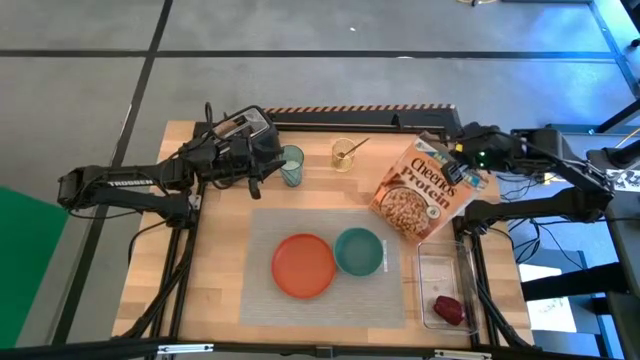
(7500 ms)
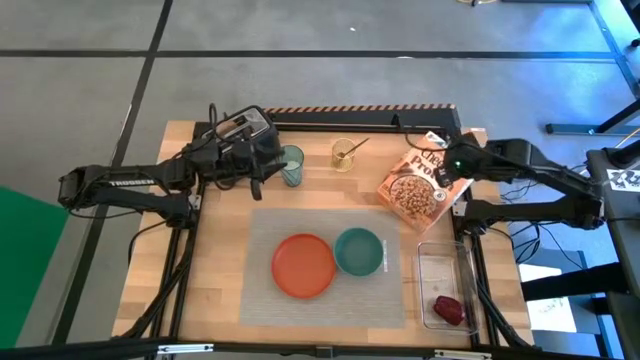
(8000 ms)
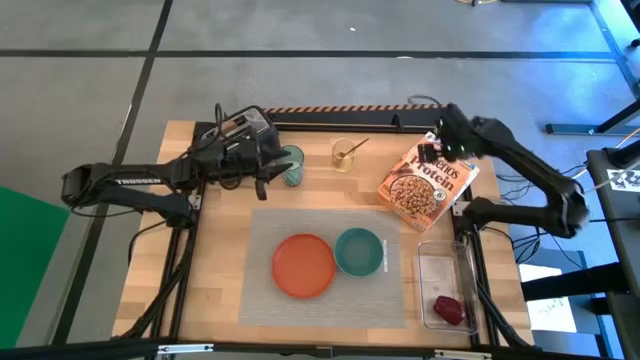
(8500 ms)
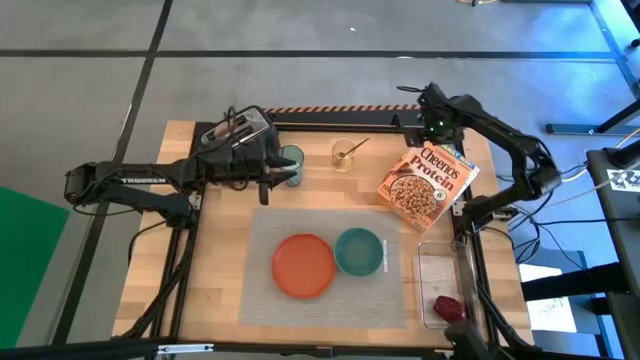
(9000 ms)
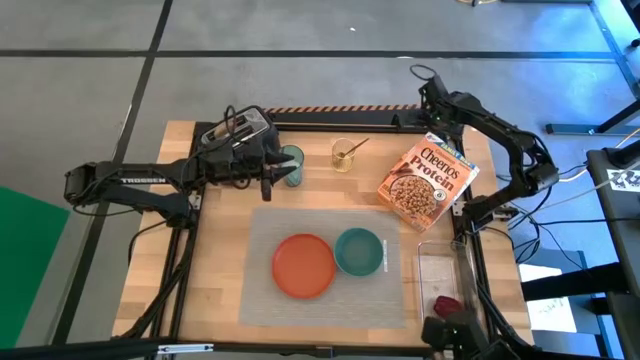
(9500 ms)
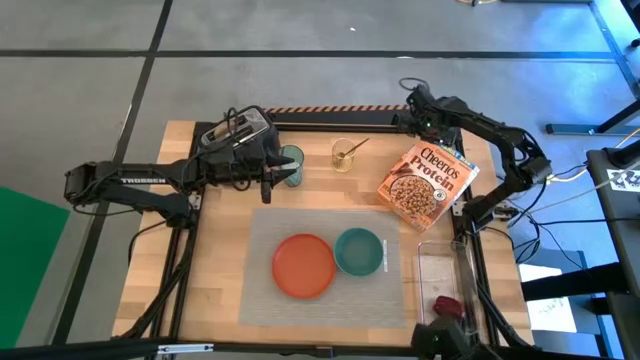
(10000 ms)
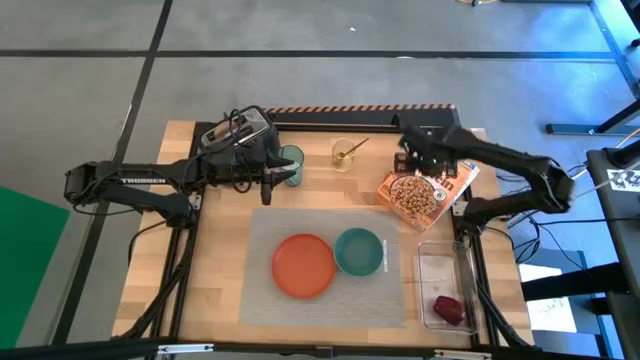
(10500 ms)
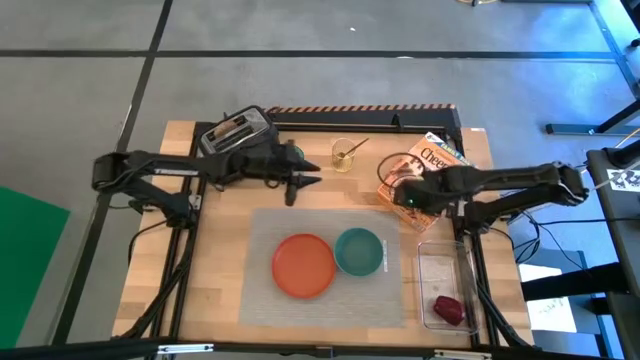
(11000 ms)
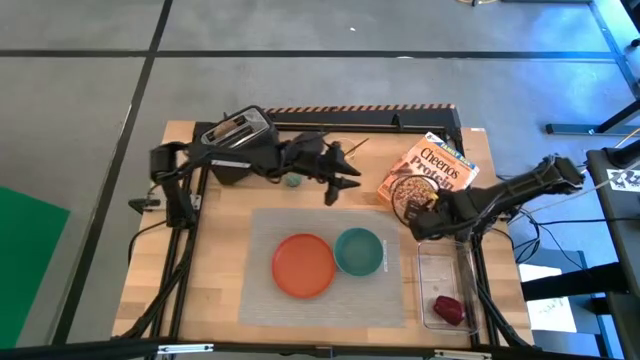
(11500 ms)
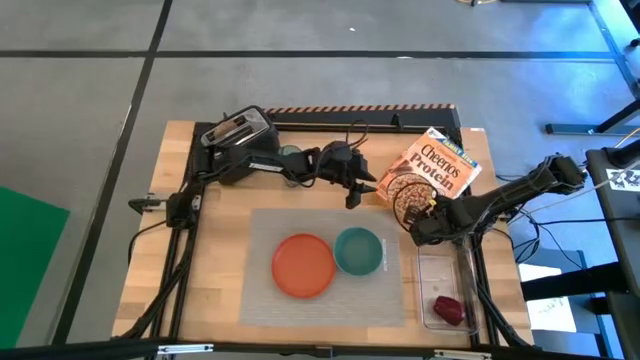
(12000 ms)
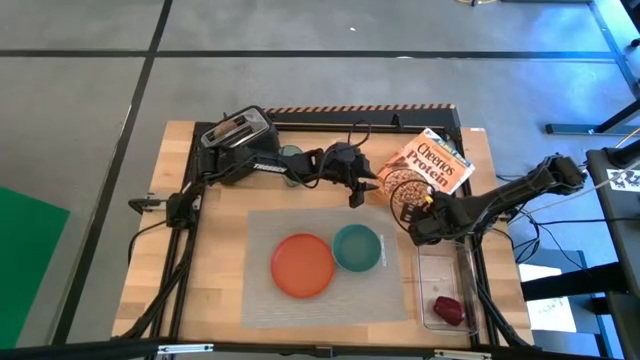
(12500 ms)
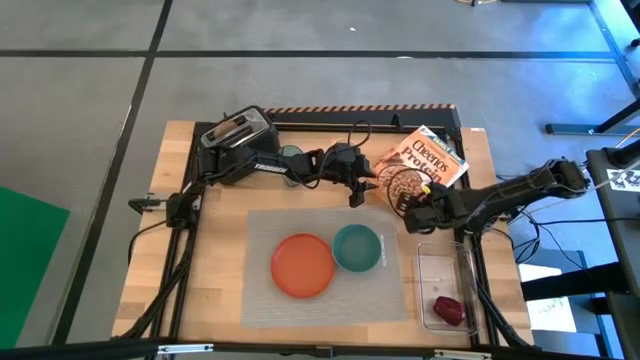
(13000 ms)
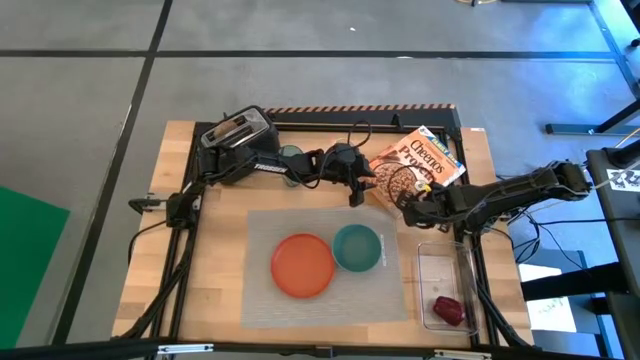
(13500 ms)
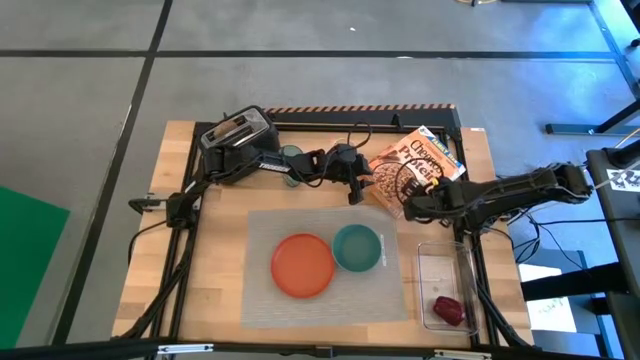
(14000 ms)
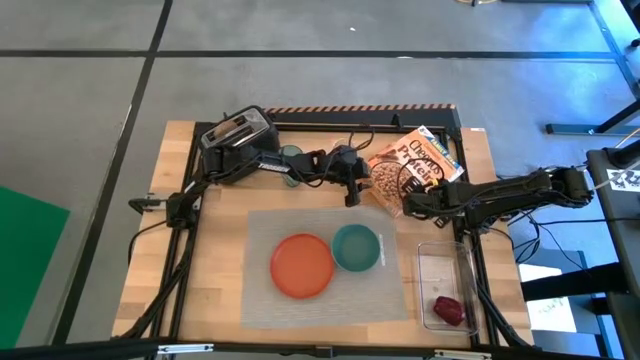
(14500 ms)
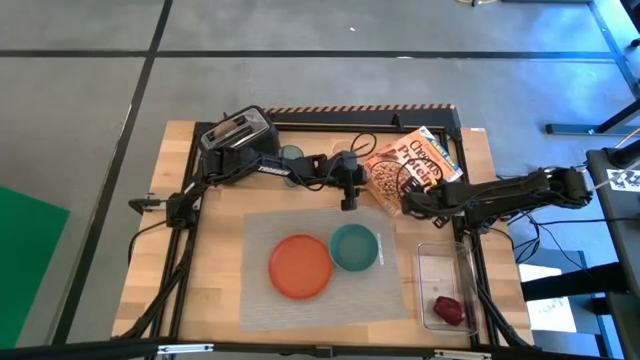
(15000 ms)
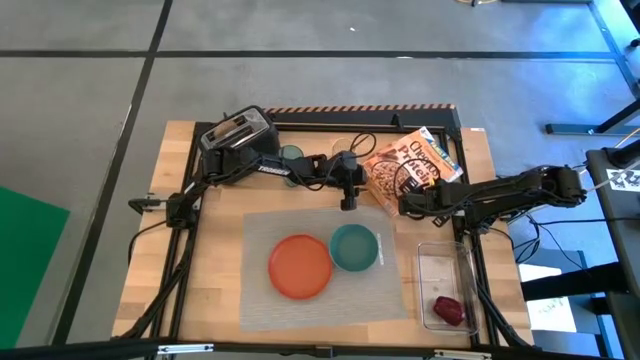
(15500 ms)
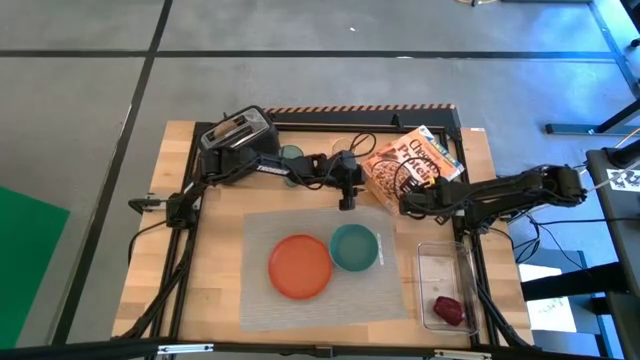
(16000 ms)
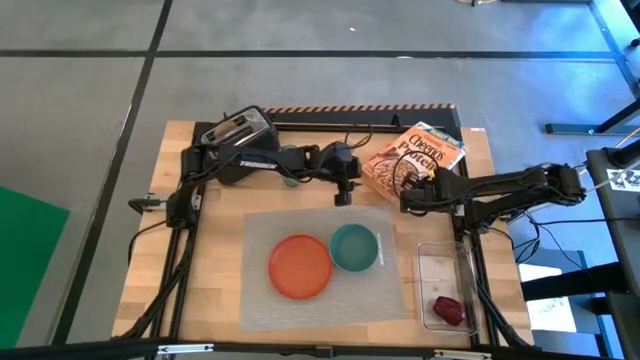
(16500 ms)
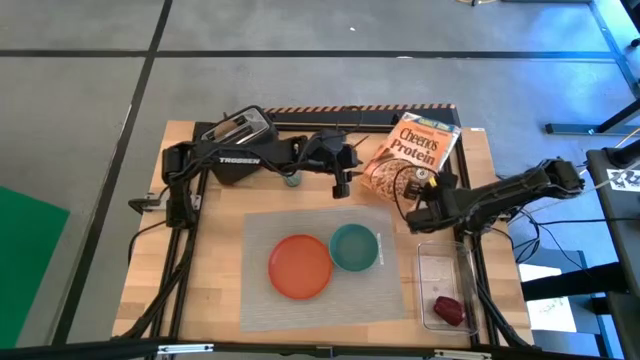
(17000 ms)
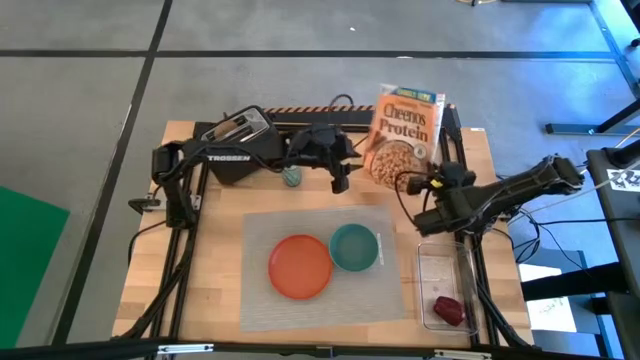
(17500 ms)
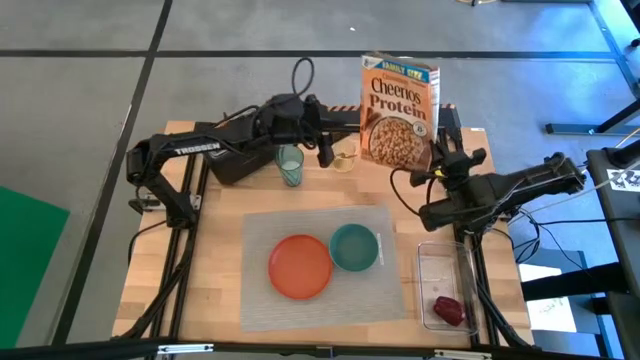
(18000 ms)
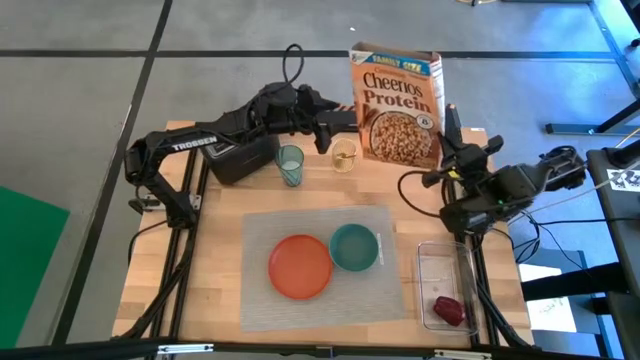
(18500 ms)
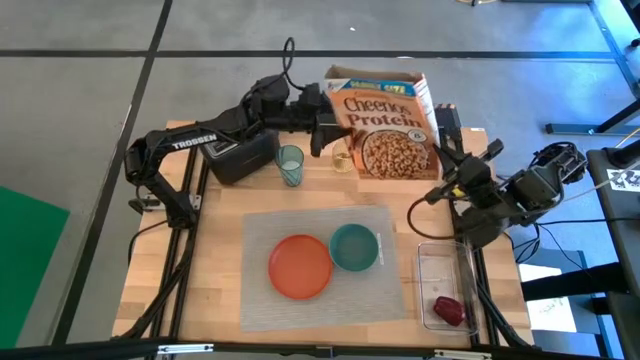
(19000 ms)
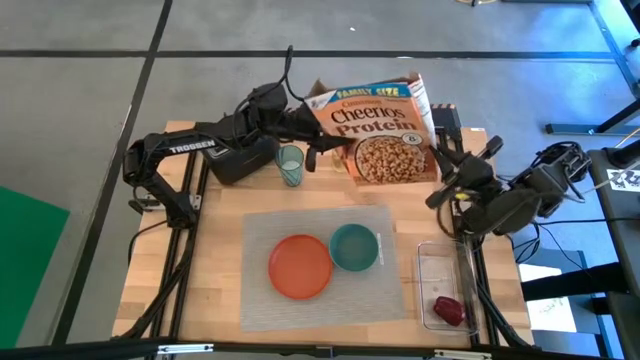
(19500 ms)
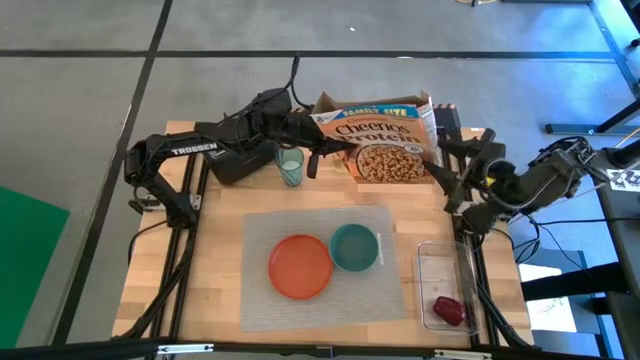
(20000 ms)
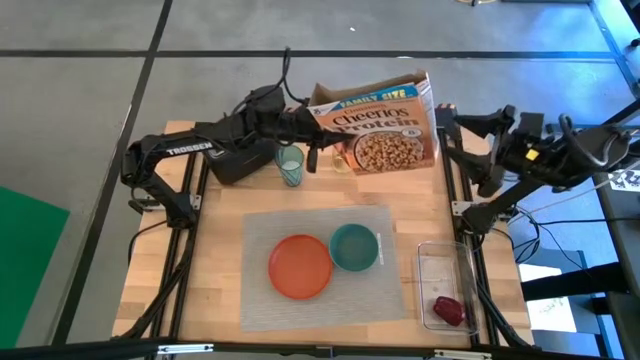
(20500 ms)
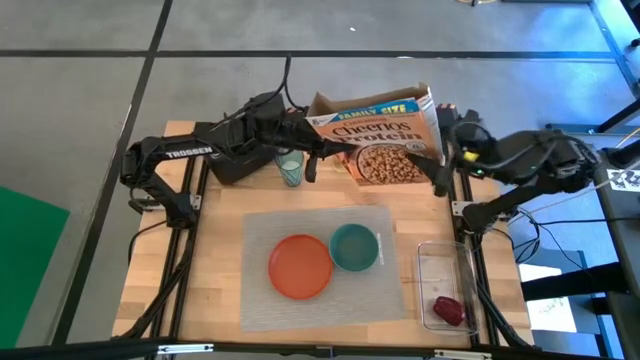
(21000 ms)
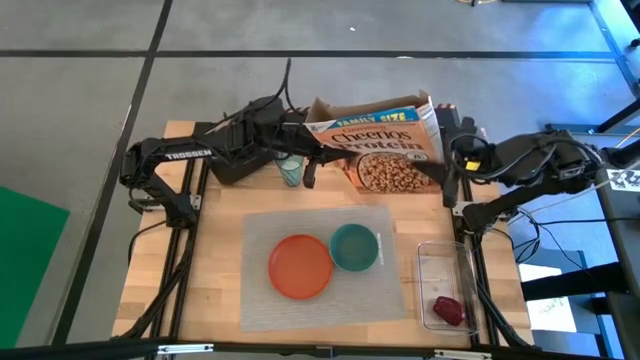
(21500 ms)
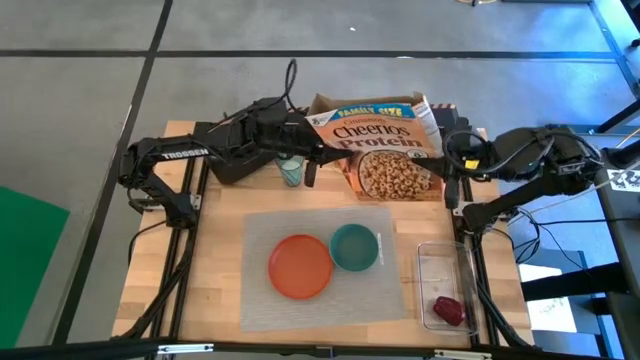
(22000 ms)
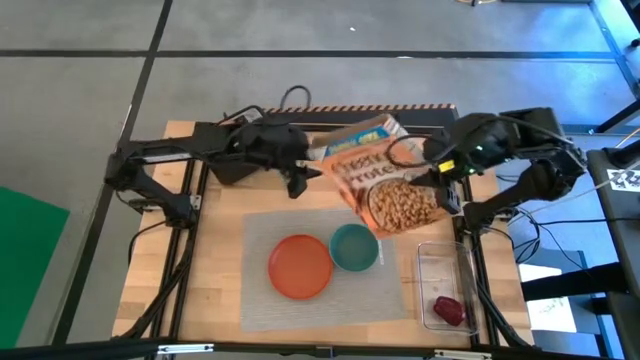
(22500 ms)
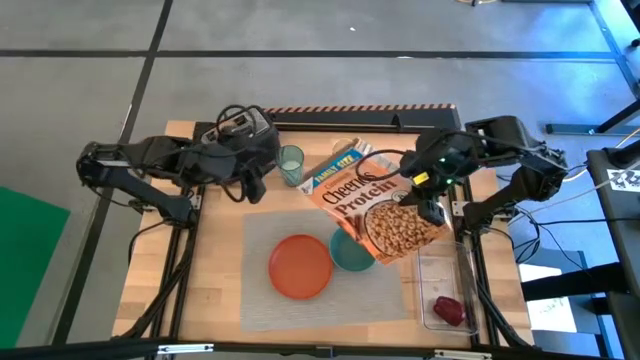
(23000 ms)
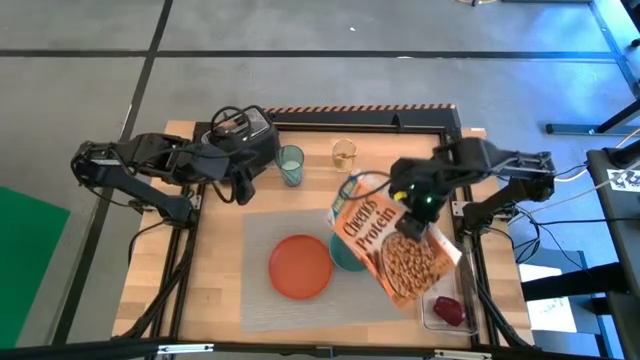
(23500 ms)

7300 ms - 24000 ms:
Task: Arrange a breakfast setting
Pour the cereal in the bowl

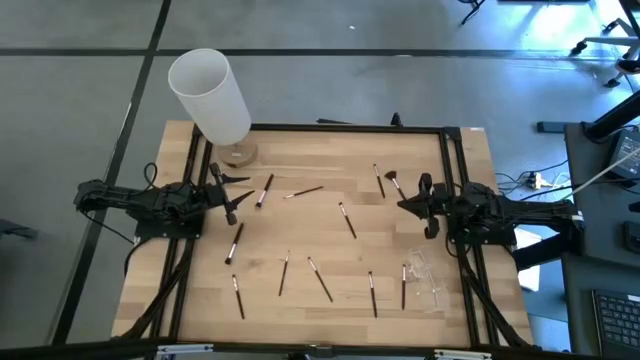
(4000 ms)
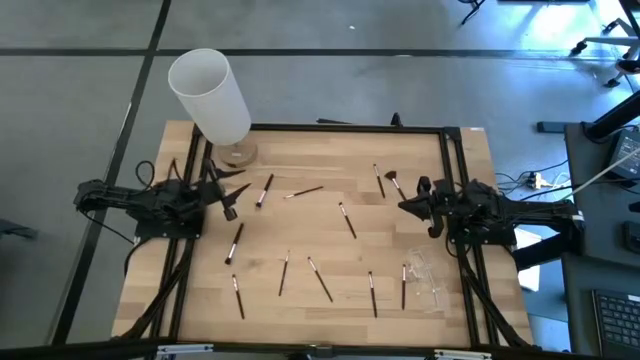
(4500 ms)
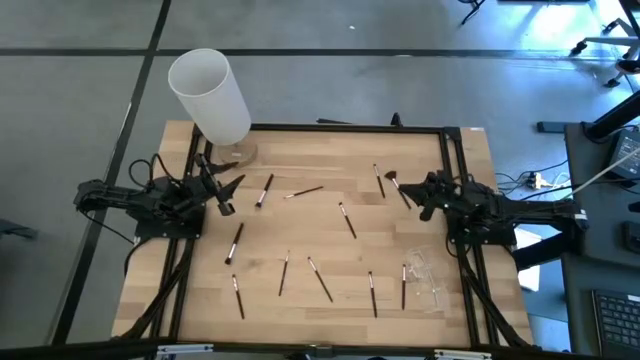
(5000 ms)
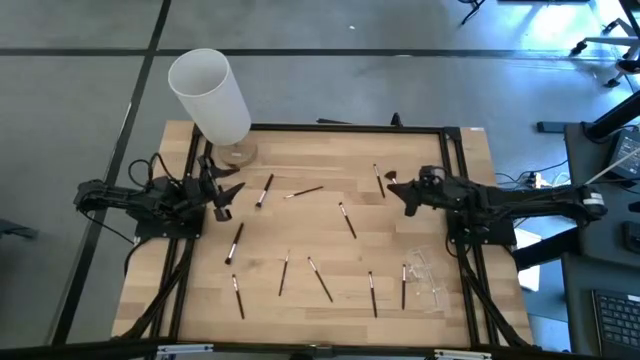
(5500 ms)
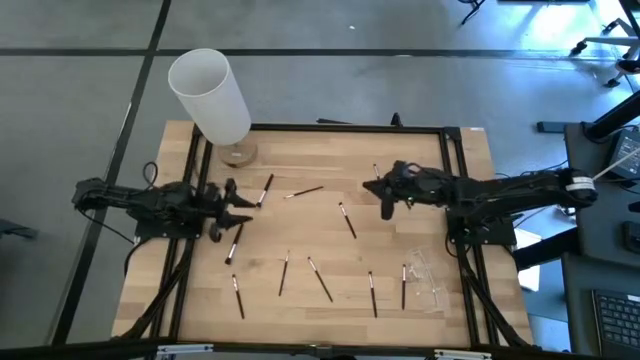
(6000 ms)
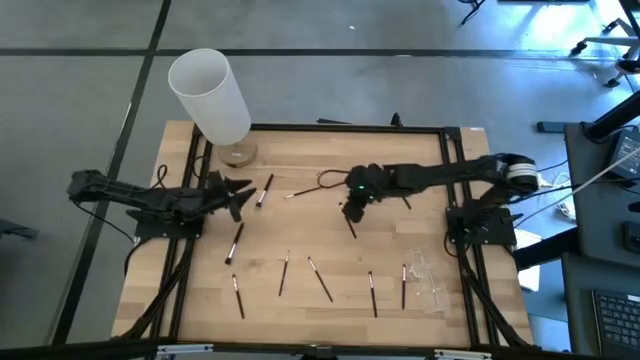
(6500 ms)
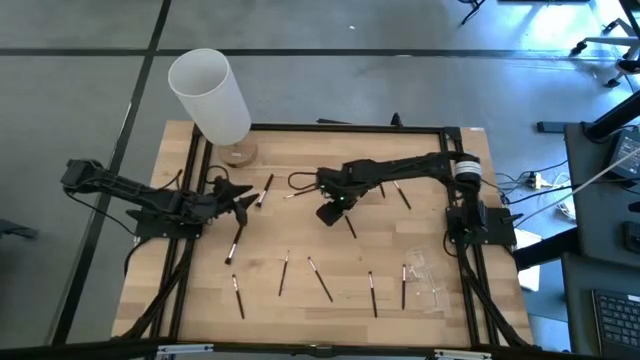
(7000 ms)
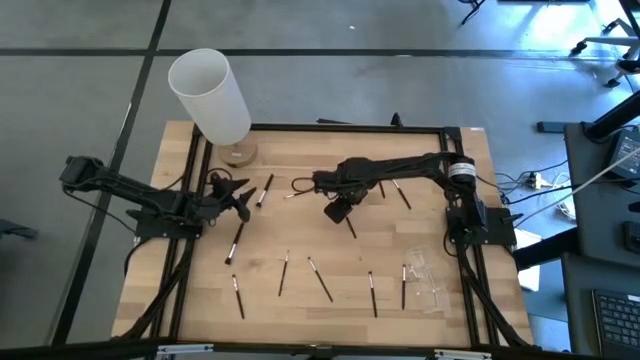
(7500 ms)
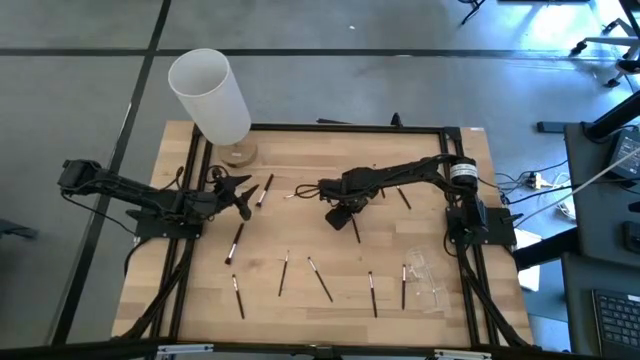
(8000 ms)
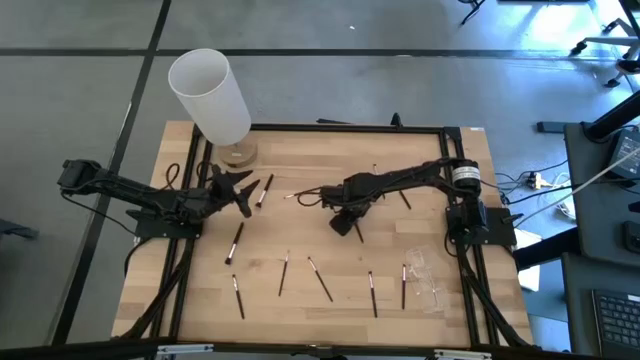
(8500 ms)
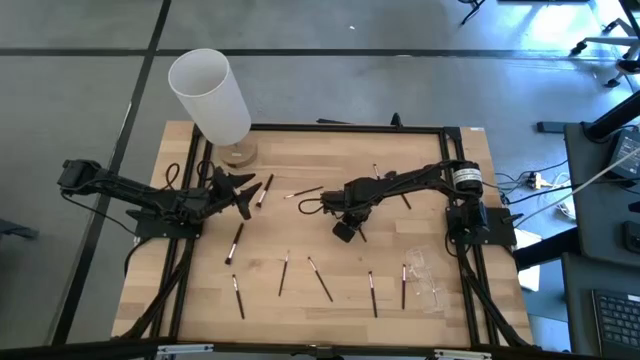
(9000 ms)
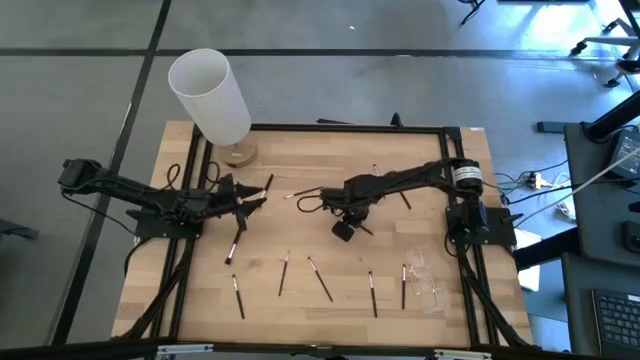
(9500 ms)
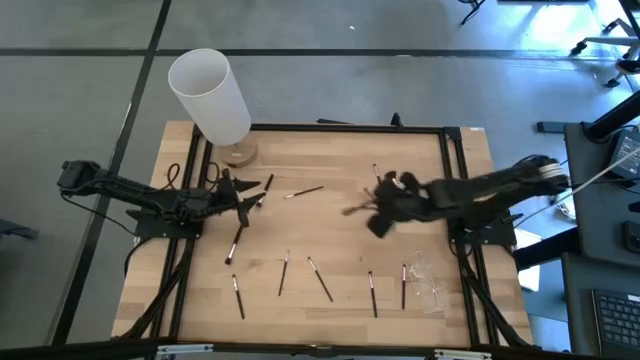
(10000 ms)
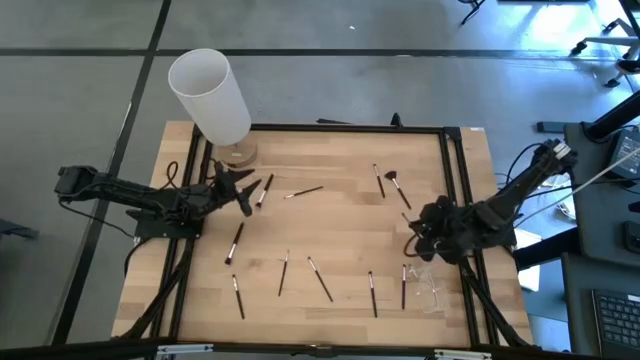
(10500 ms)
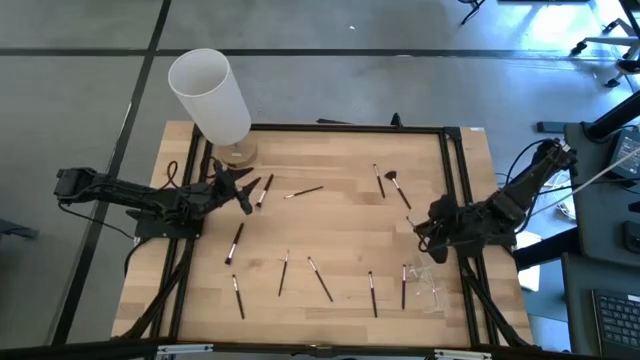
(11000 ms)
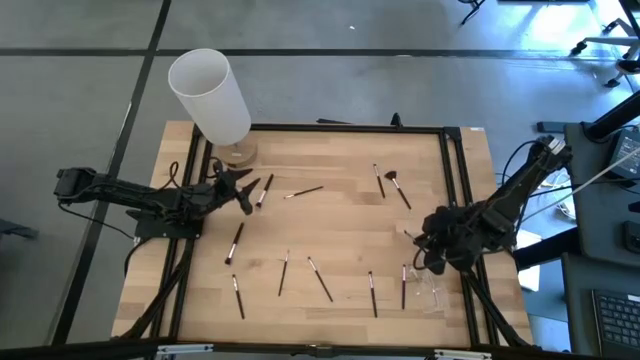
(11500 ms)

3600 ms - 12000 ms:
Task: Put items in baskets/containers
Put the black angled eyeshadow brush into the transparent organizer
